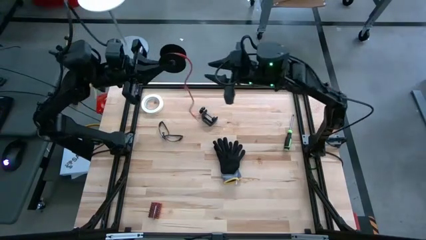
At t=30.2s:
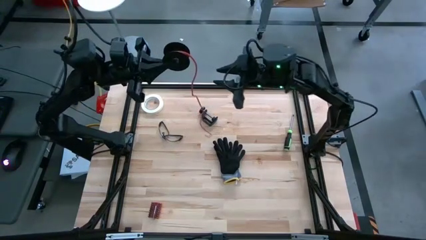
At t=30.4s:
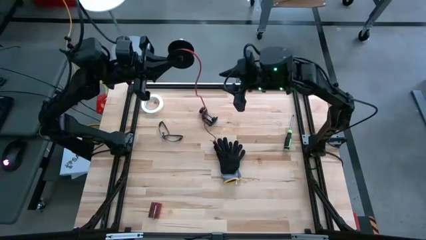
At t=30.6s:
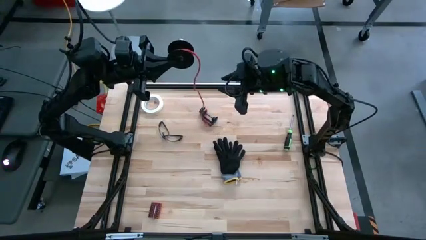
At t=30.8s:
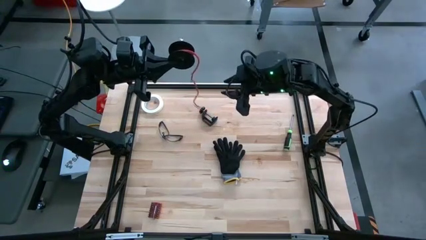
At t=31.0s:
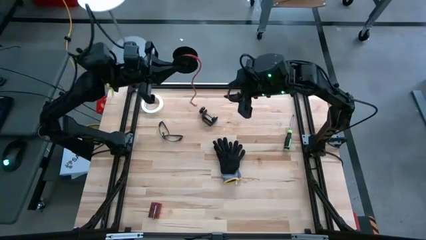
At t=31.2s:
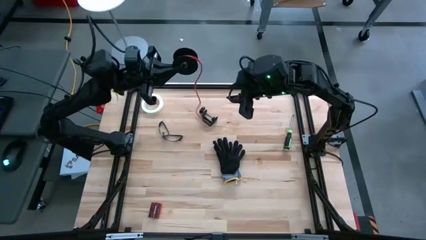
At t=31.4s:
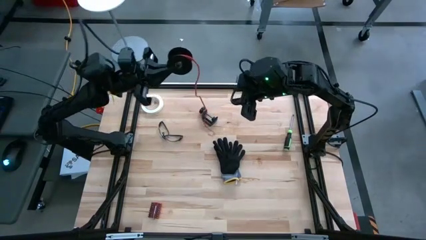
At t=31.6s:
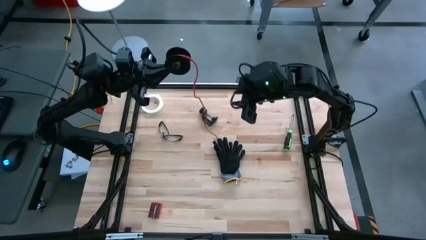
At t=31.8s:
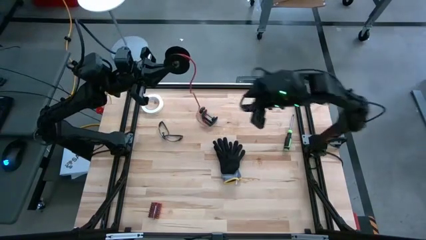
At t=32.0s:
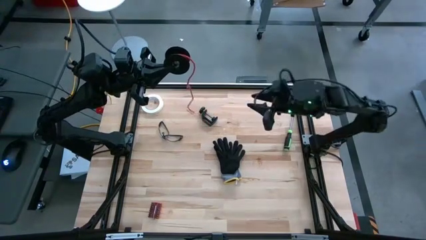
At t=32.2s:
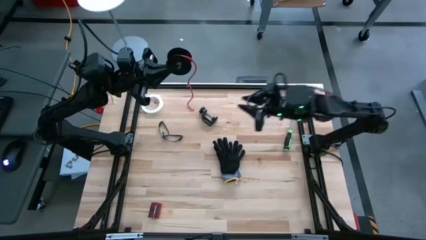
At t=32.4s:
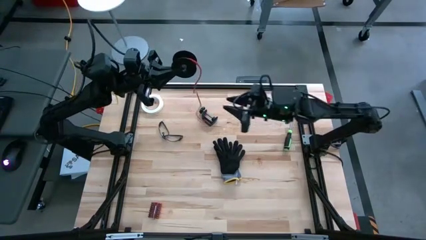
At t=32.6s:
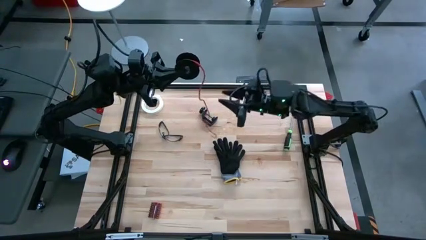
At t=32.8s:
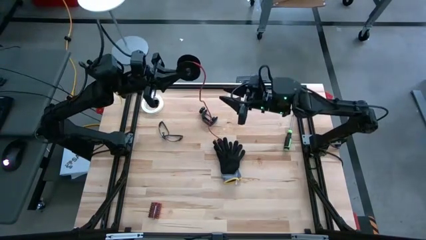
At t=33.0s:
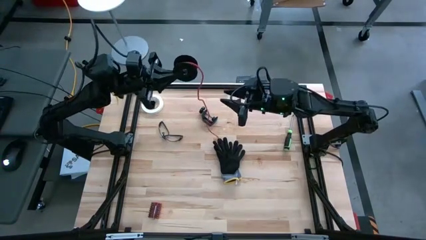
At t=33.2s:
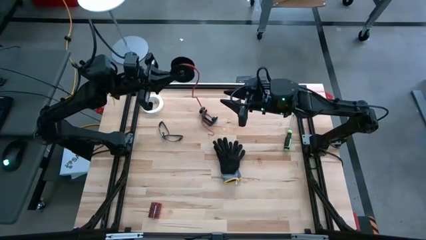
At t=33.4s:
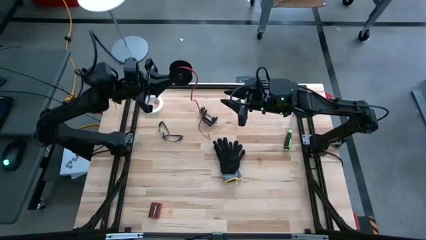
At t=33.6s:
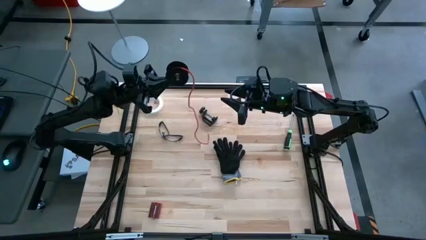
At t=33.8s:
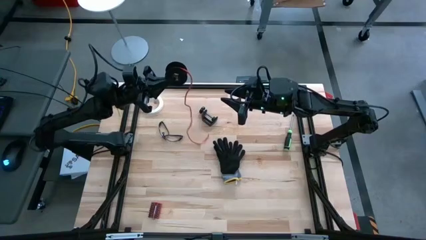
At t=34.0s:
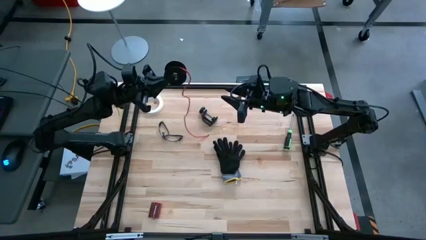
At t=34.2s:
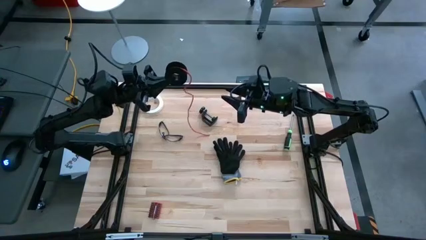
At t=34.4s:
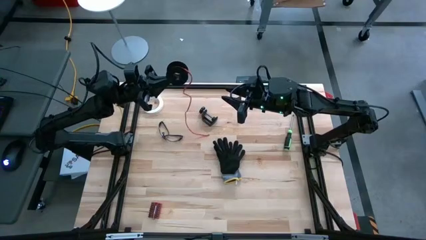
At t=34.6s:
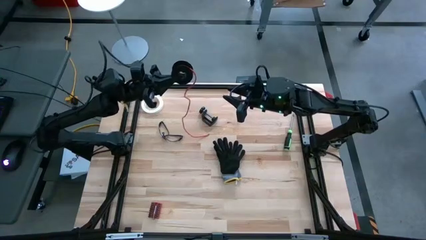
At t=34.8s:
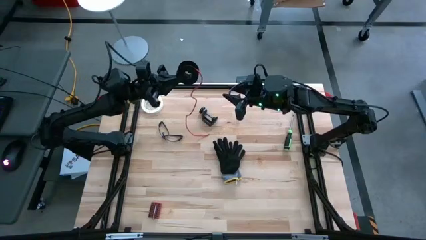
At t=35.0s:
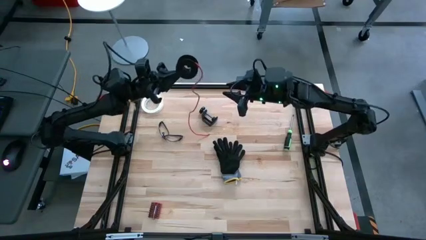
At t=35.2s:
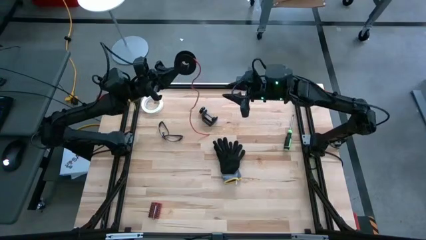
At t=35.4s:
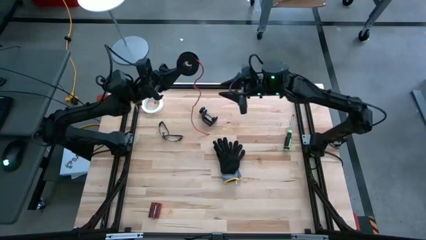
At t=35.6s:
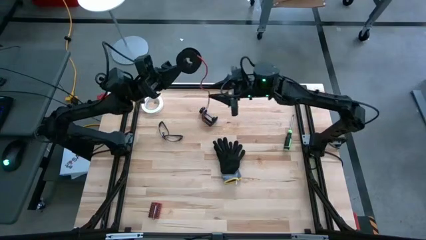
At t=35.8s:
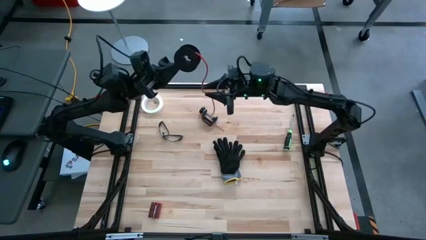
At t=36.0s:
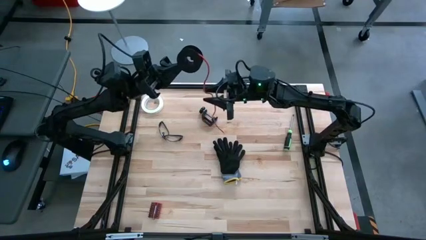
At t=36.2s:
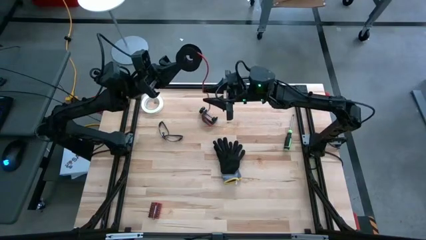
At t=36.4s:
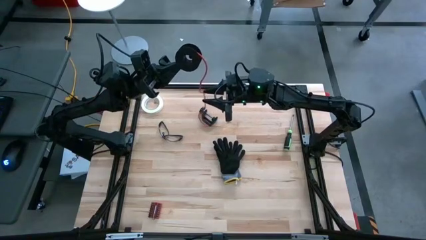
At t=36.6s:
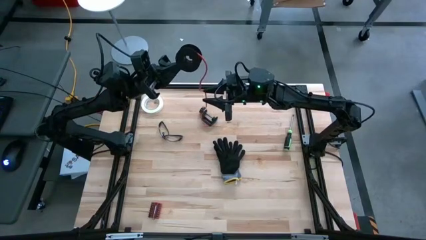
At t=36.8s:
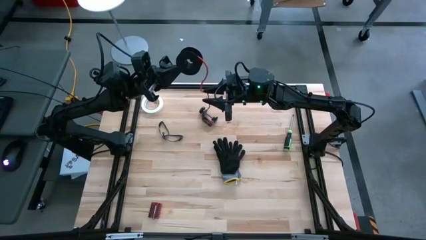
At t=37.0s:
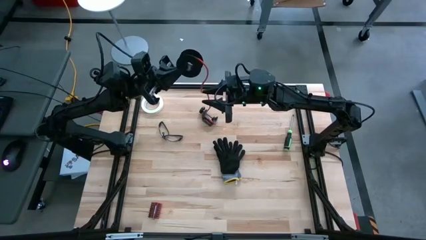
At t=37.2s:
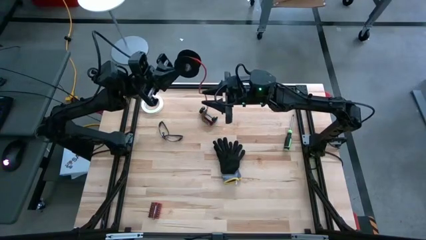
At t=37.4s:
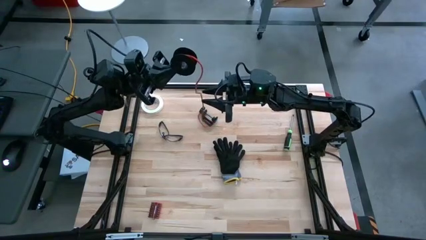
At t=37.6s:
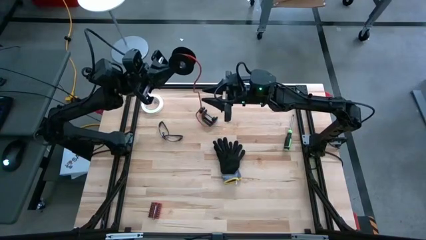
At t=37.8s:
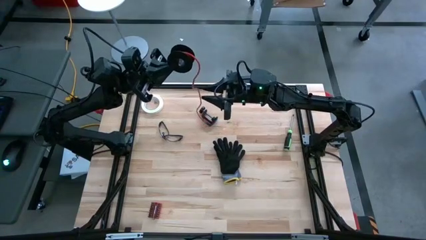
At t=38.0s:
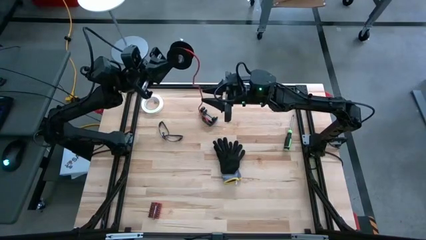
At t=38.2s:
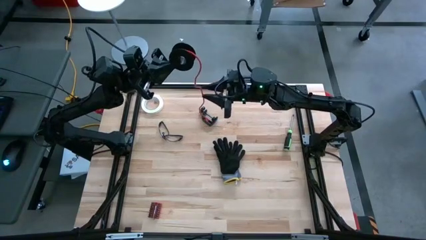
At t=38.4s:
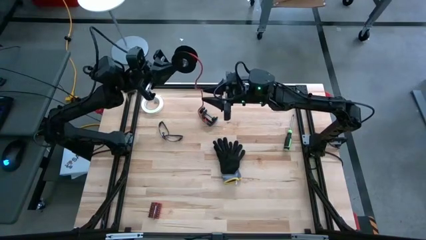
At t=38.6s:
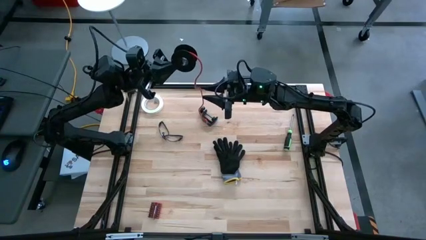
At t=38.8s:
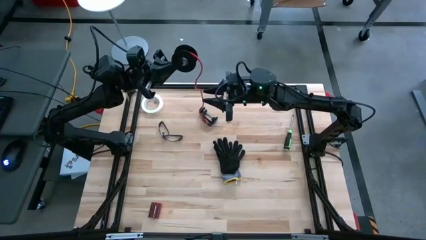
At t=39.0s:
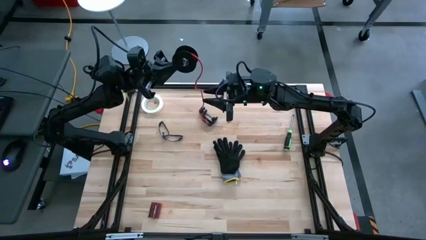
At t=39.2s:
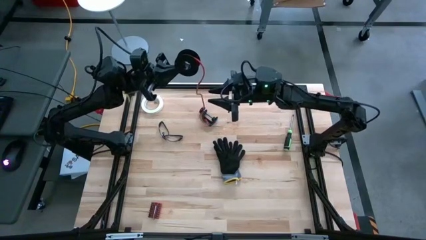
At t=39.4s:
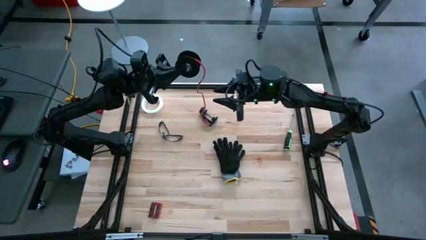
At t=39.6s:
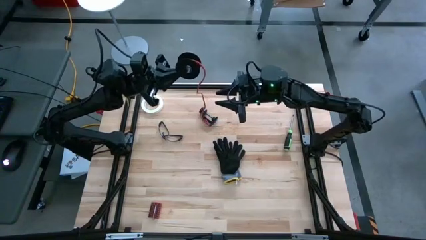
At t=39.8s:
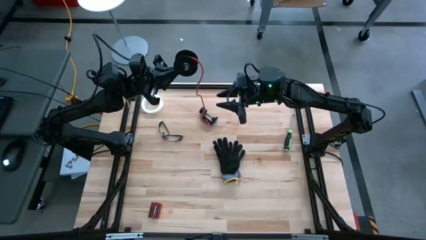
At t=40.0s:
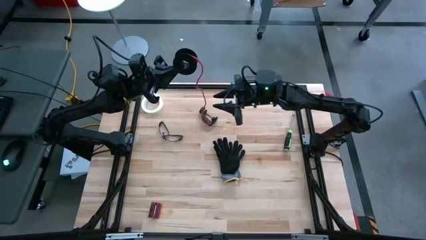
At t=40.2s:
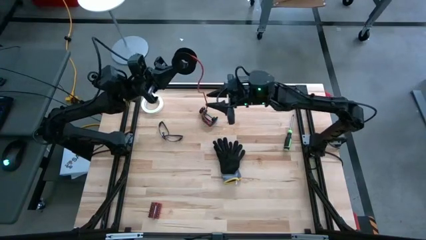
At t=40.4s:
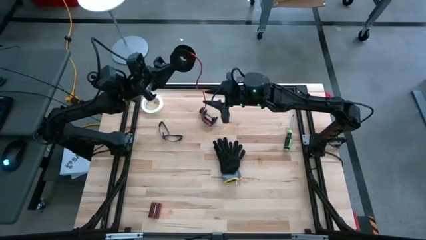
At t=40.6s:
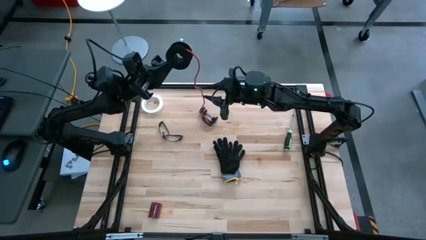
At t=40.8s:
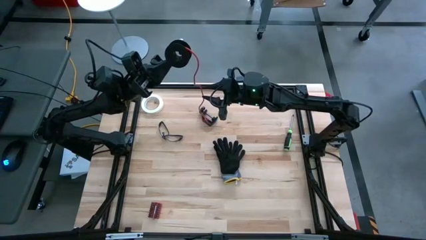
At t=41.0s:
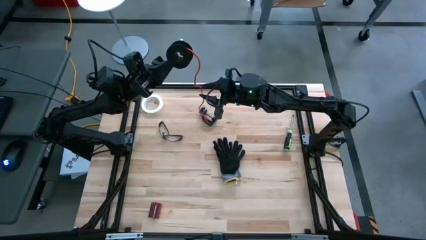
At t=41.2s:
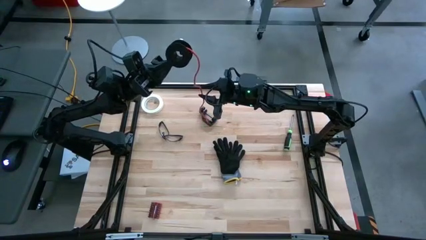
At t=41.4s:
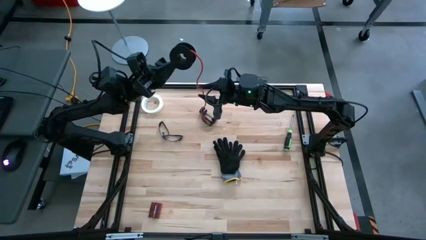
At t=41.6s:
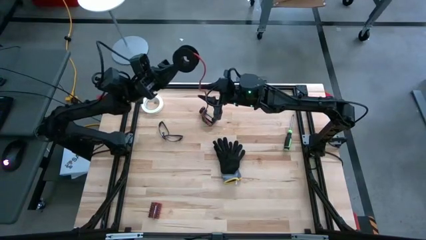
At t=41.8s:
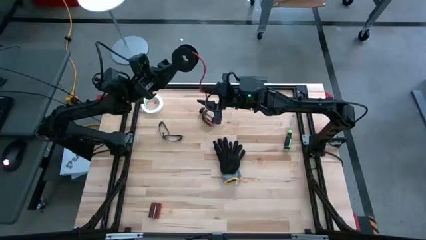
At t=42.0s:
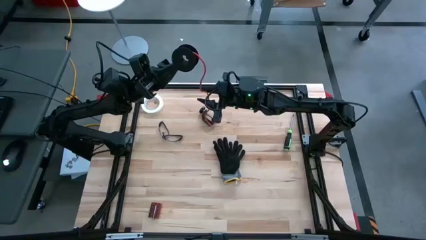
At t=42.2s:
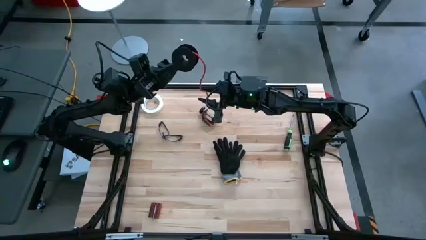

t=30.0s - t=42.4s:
Task: Coil cords
Coil the orange wire onto the spool

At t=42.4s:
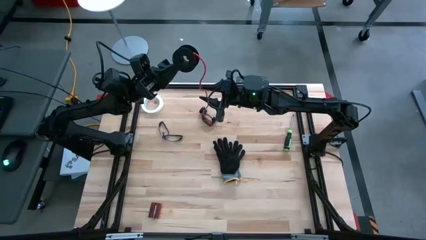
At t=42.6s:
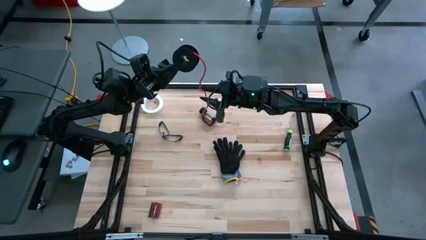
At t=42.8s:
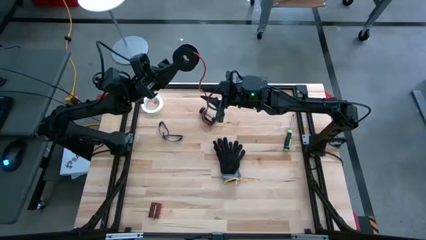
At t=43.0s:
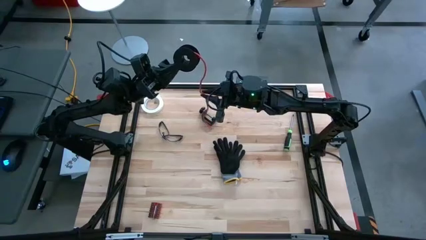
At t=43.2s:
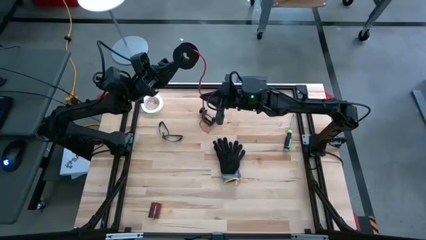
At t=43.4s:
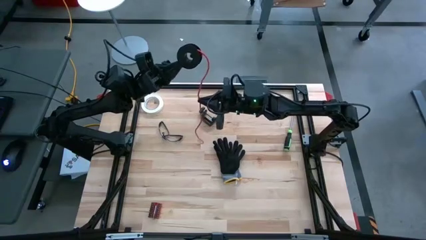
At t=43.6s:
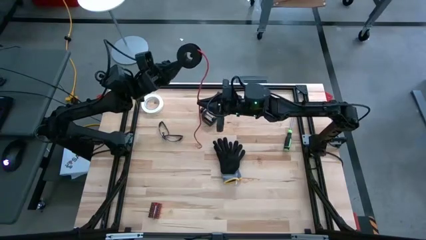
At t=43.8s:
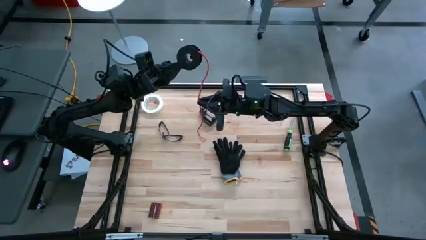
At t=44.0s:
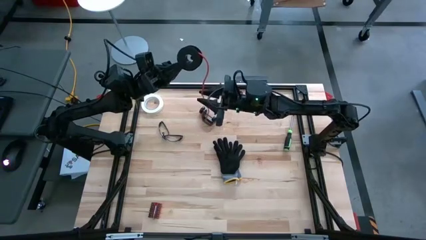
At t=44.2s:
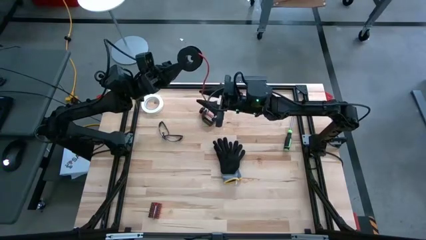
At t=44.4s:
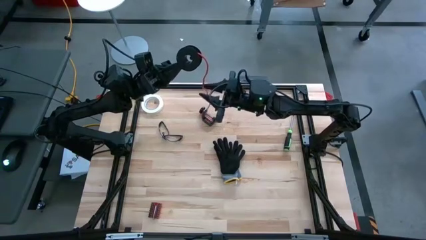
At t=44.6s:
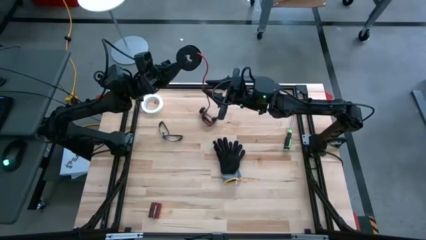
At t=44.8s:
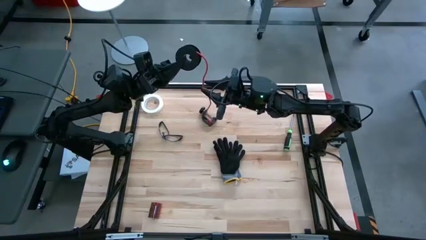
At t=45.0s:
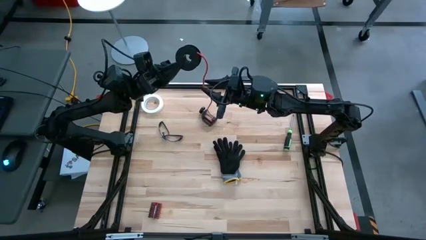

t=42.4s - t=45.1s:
Coil the orange wire onto the spool

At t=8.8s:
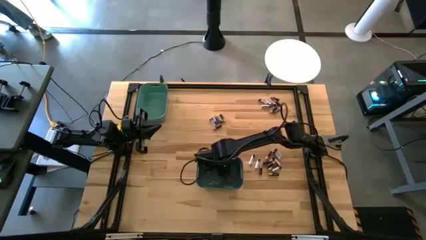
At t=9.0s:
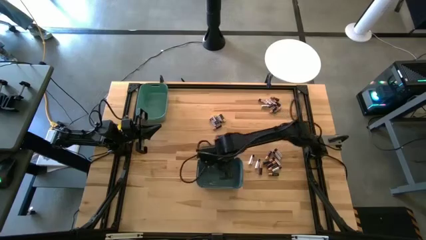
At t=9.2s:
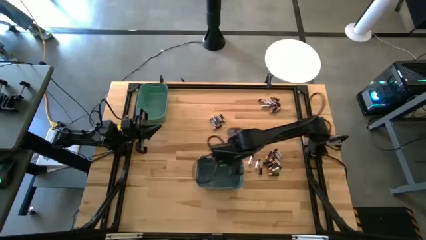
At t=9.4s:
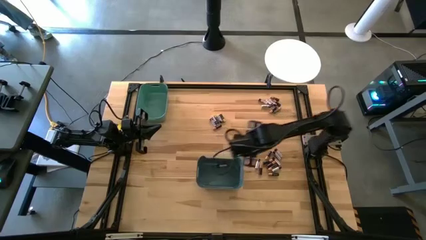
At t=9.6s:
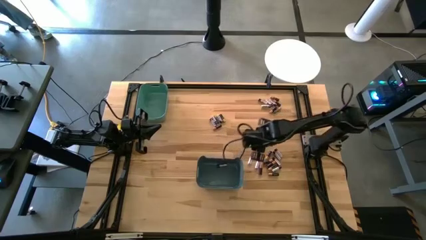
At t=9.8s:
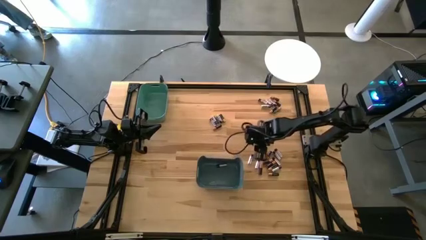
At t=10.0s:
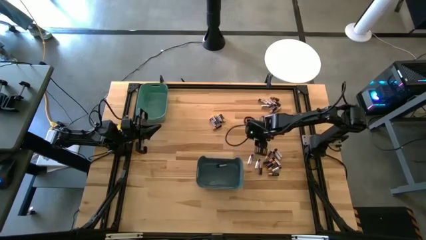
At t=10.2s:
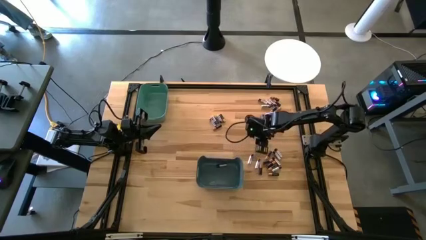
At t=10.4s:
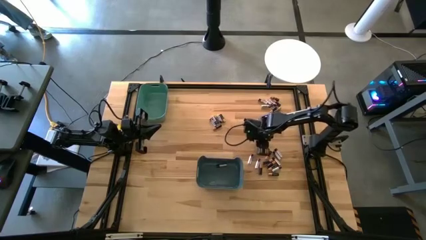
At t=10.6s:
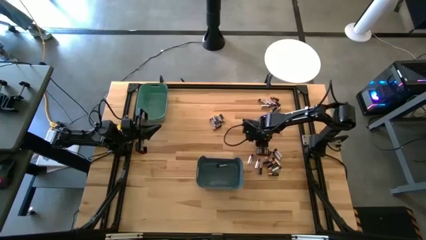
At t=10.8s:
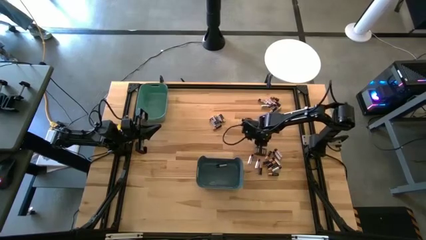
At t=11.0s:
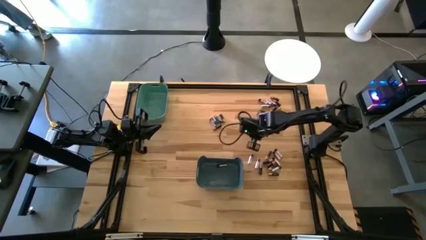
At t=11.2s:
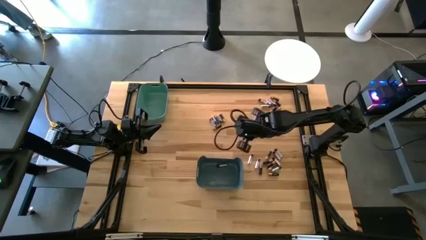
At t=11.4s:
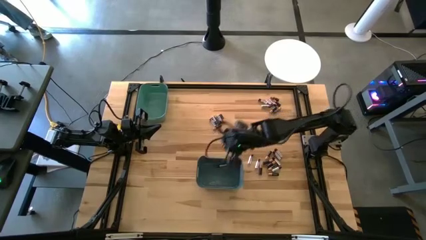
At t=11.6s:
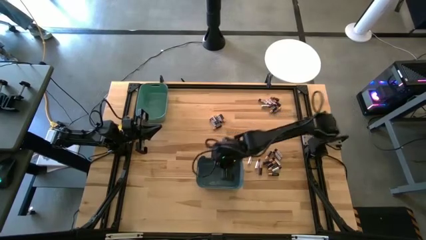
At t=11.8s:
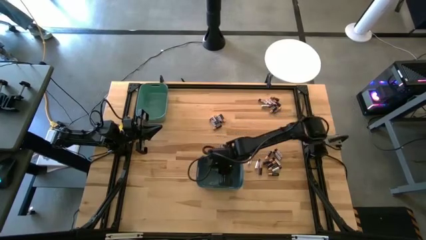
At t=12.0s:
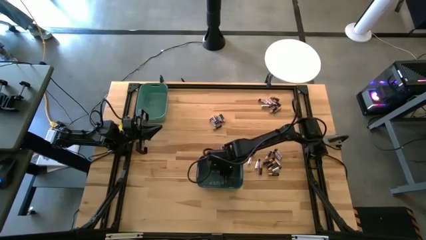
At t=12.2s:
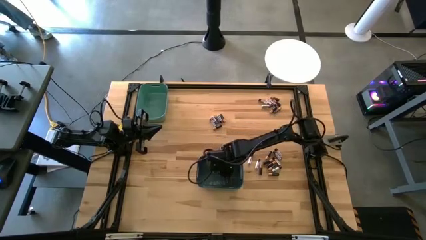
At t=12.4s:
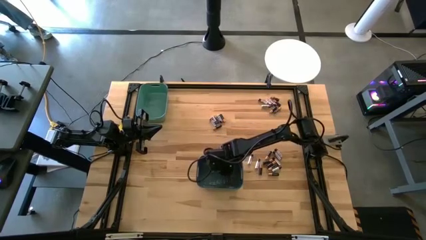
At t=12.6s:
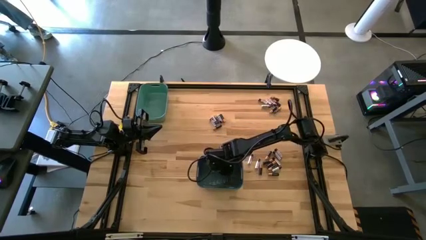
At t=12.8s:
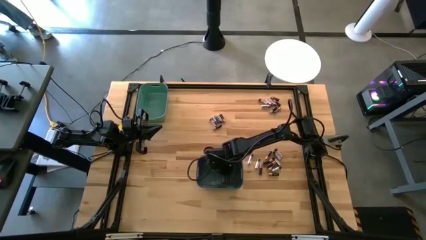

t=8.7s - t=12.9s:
Task: Sort batteries
Put the silver battery into the blue bin
